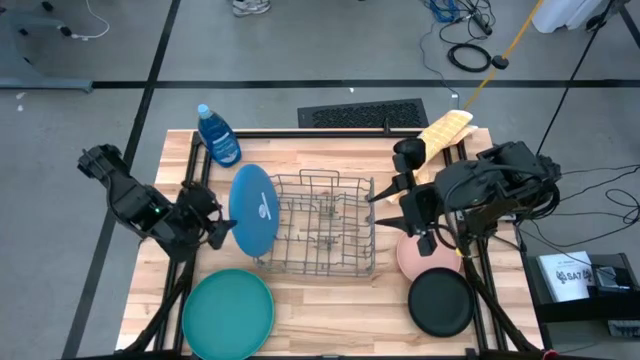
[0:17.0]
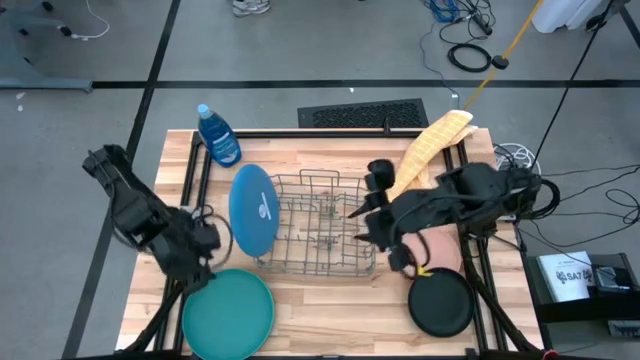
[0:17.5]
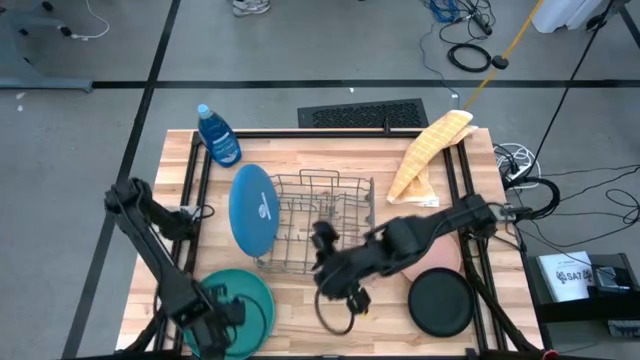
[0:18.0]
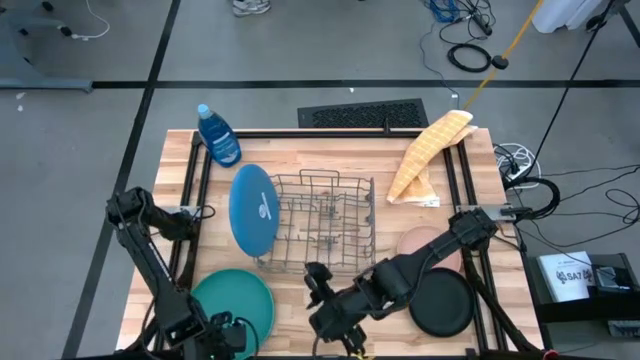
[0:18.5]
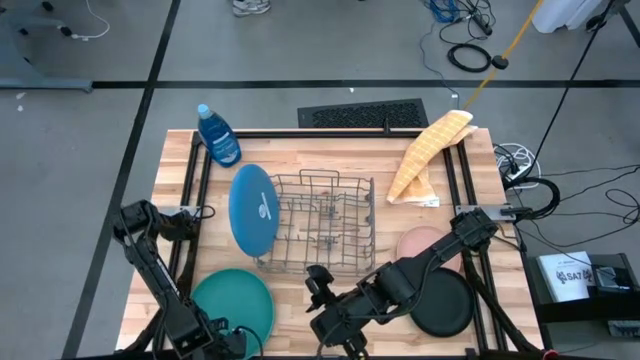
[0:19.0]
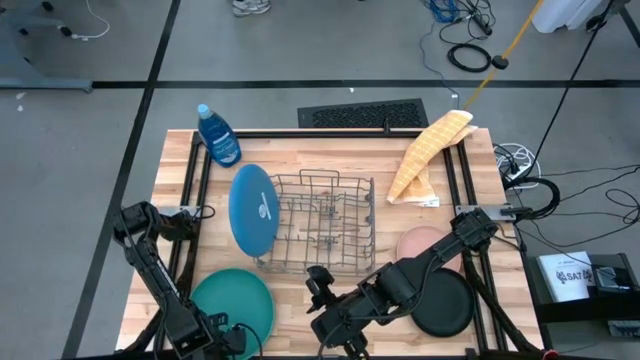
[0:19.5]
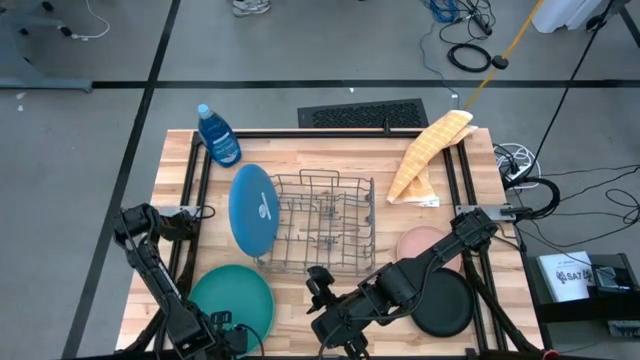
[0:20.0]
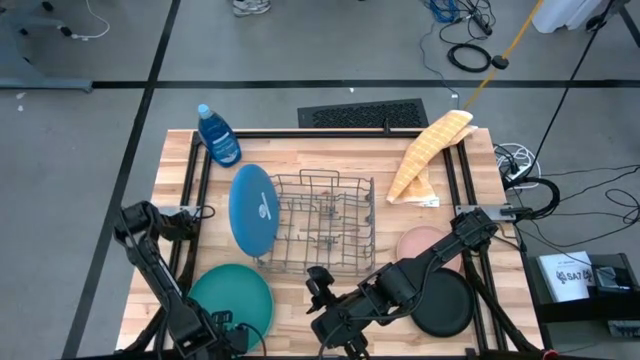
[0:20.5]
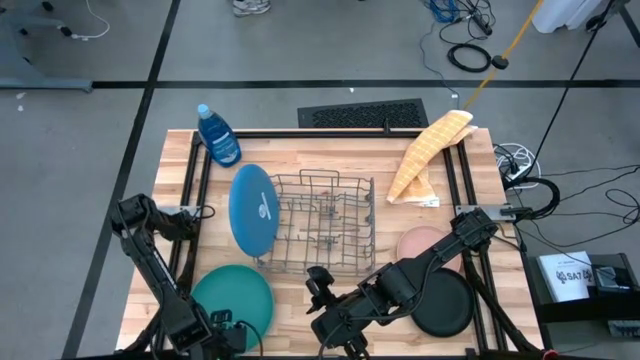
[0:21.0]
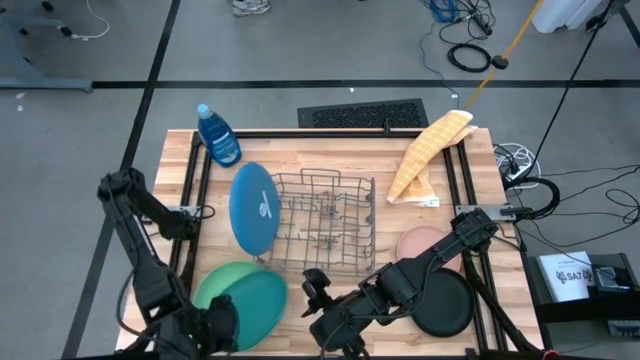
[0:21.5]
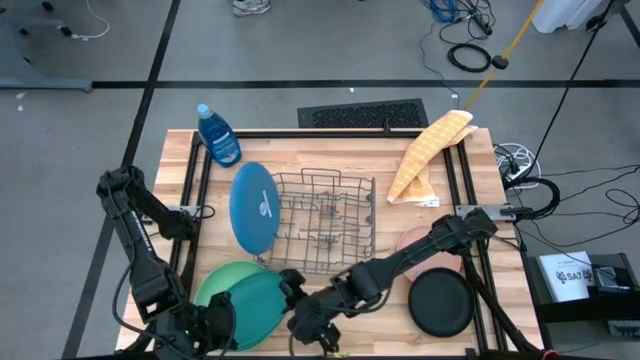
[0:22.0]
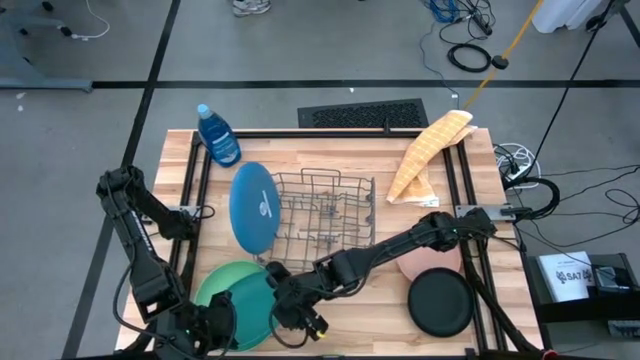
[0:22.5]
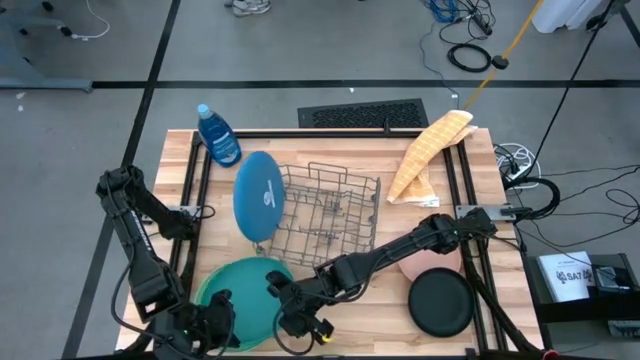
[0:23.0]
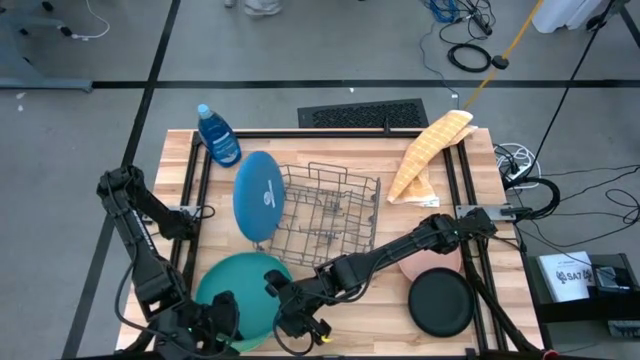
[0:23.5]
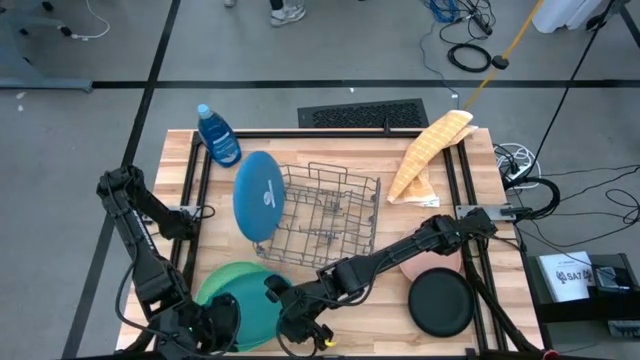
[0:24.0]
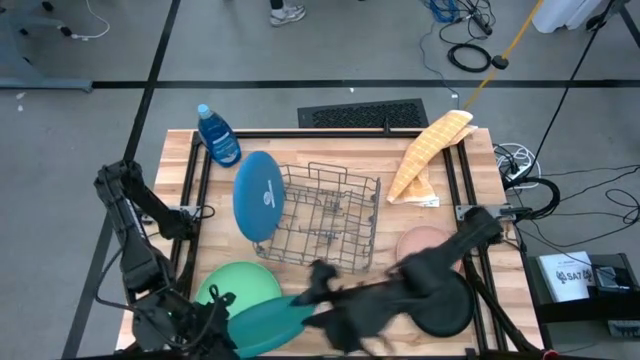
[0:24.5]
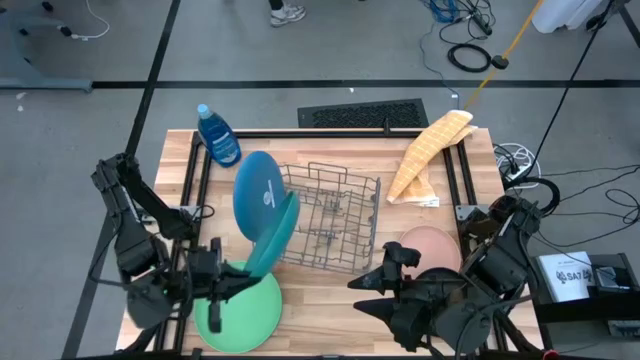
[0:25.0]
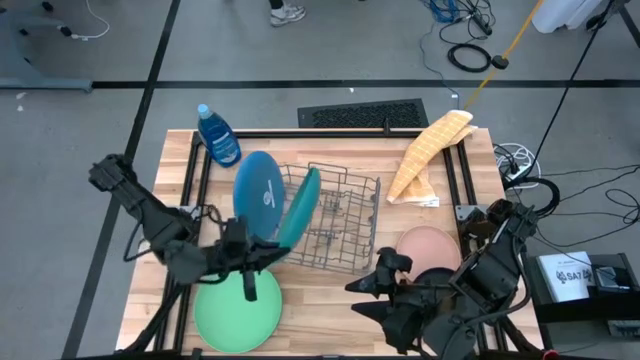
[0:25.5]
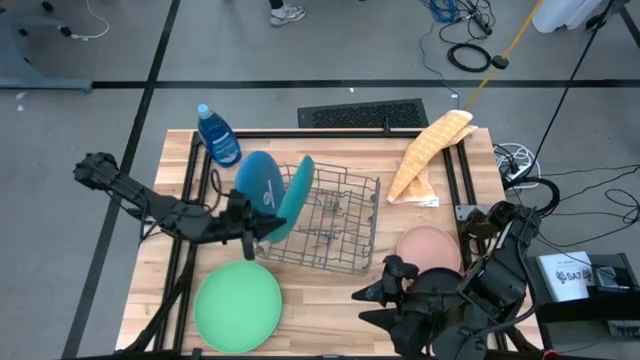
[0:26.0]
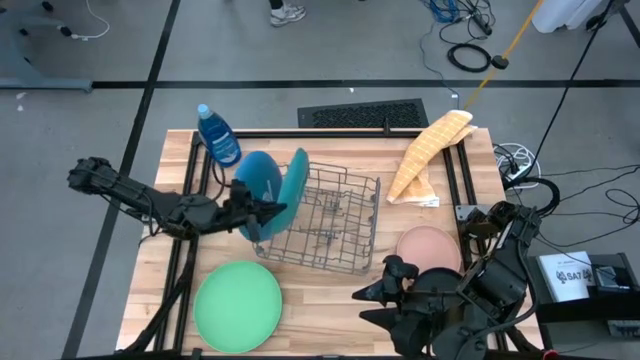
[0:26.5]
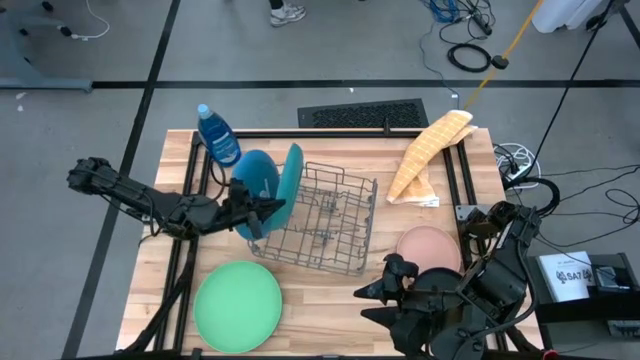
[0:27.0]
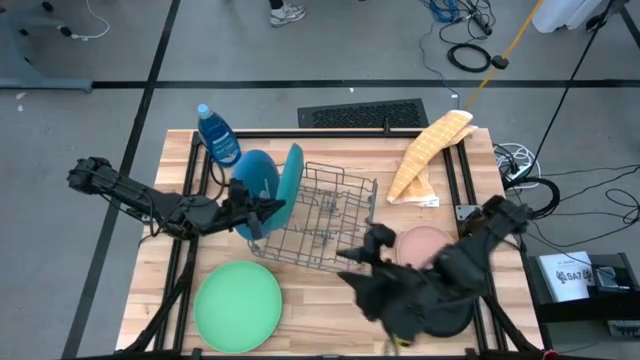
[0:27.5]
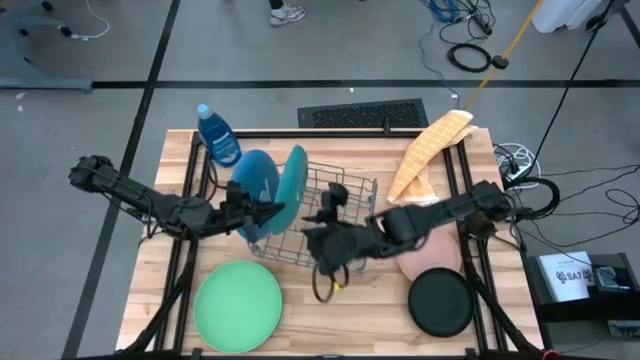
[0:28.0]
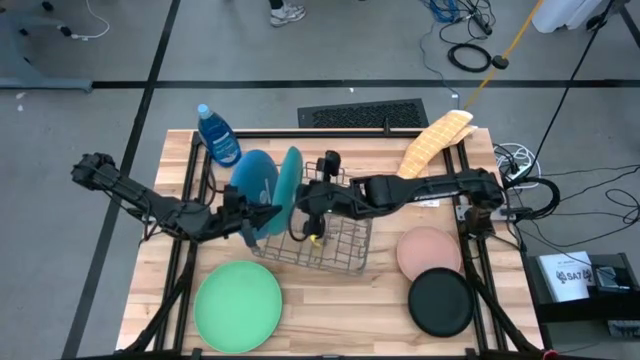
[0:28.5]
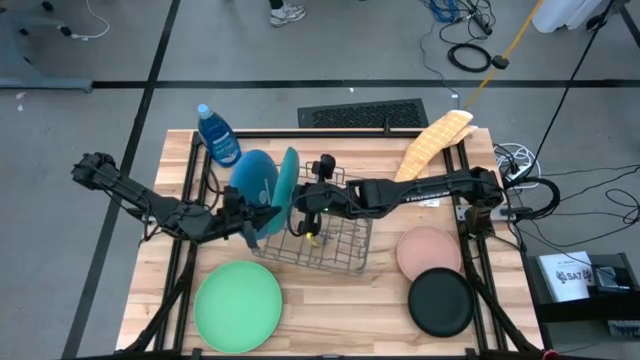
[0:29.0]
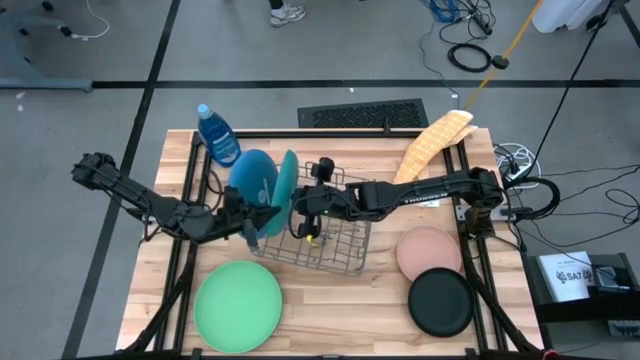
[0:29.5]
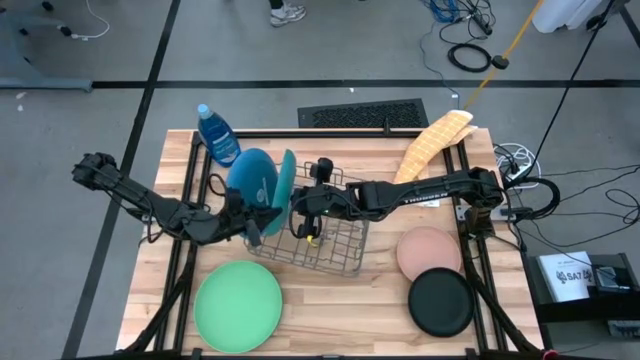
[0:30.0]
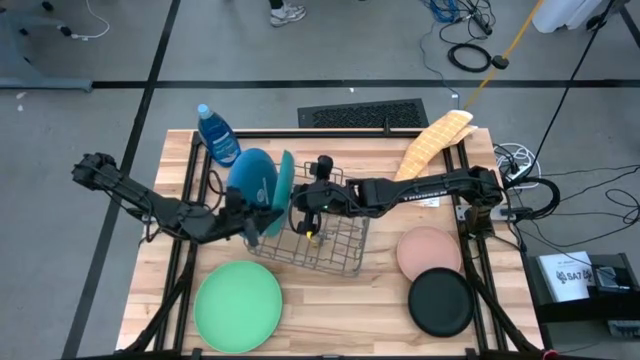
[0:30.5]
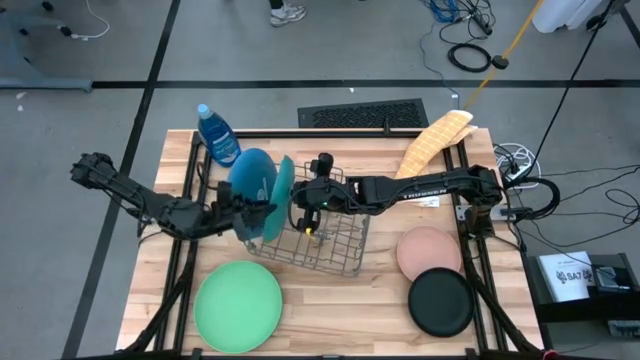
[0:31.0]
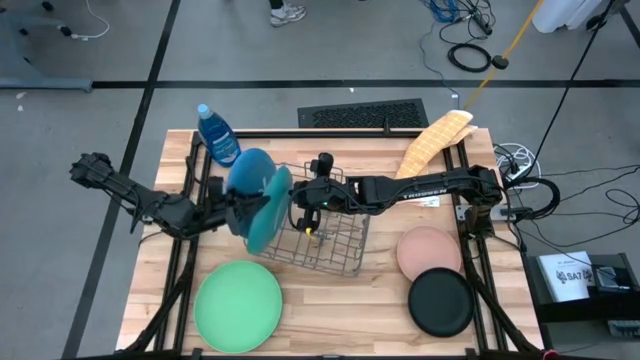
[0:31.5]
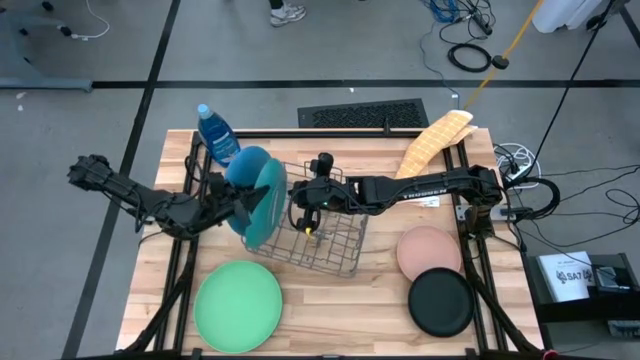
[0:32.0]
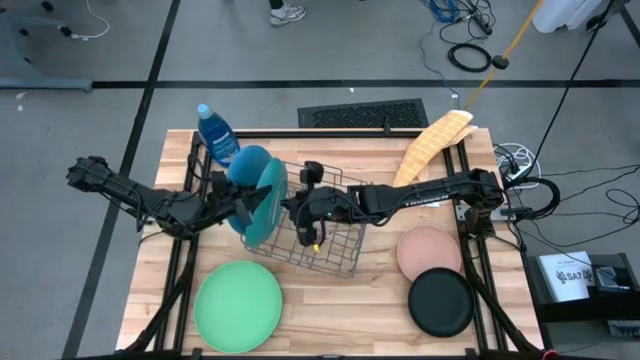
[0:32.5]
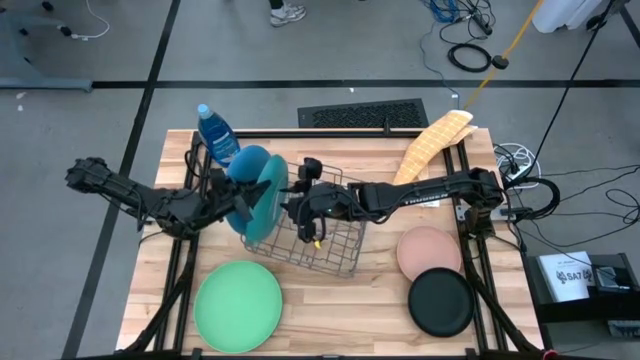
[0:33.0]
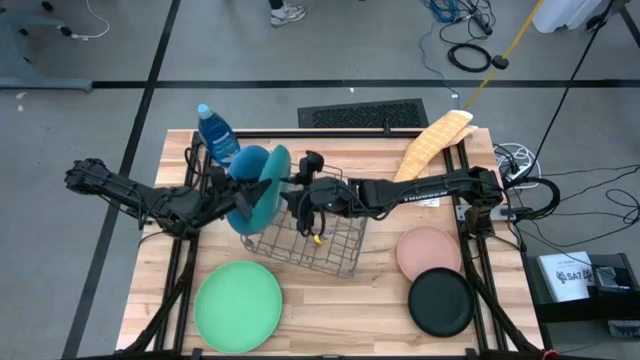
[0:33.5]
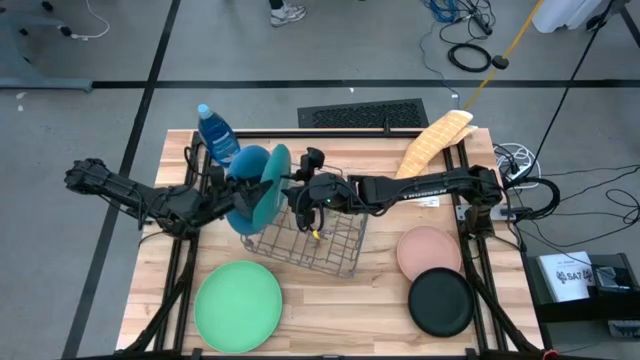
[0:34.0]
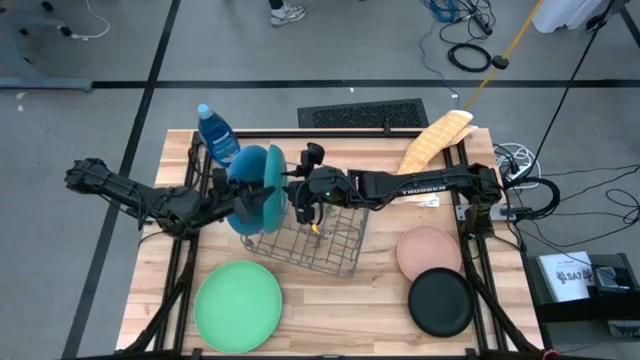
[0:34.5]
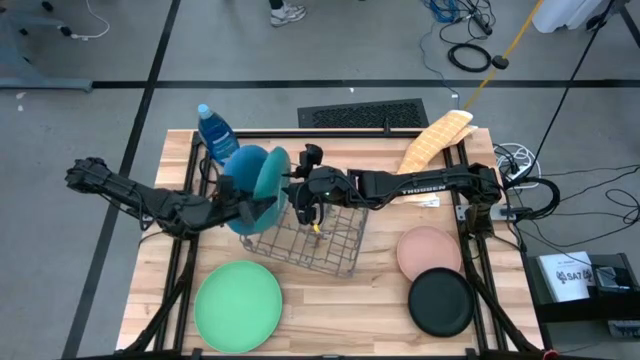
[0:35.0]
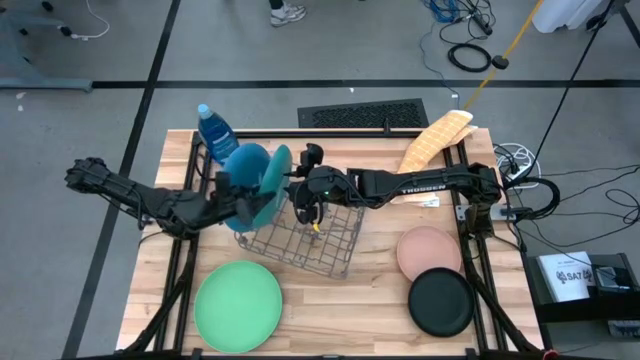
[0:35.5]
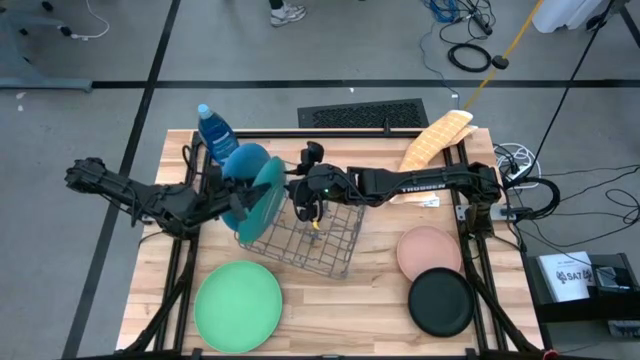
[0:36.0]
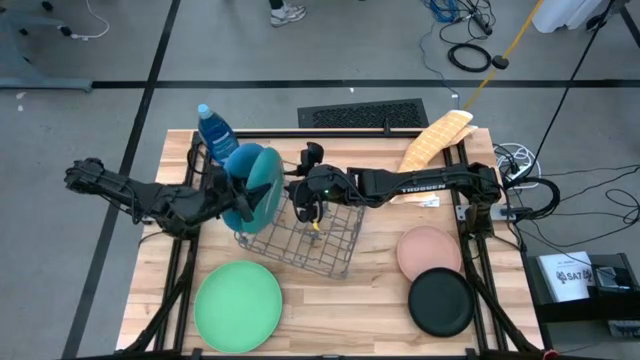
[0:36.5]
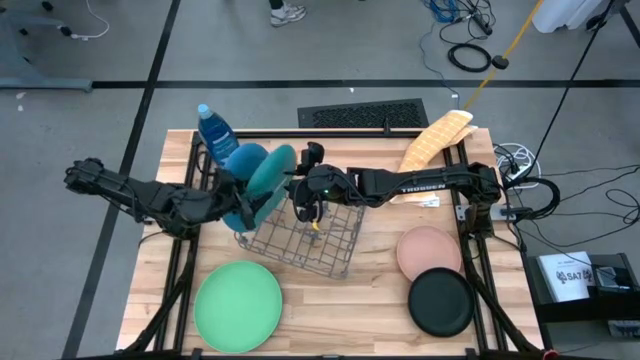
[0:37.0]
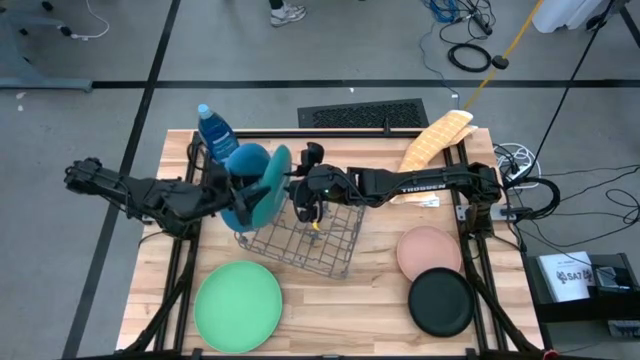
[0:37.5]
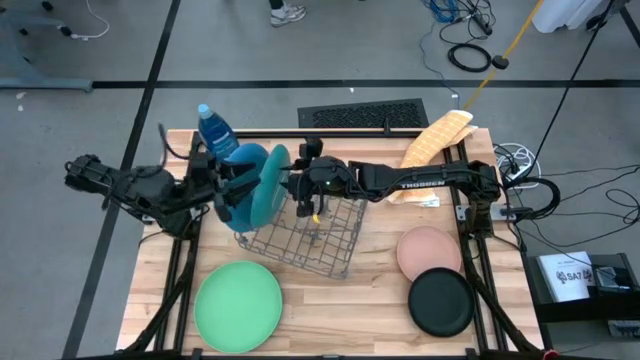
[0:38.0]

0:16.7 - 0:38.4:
Task: Sort dishes
Put the blue green plate into the dish rack
